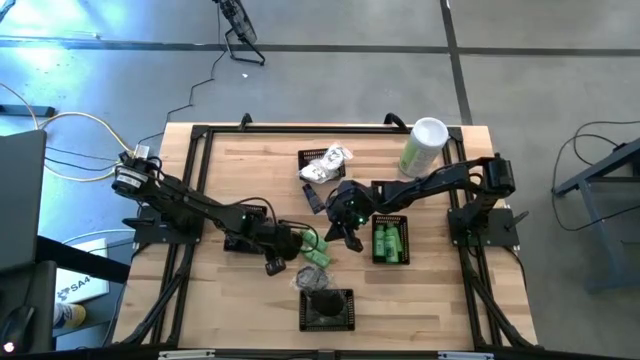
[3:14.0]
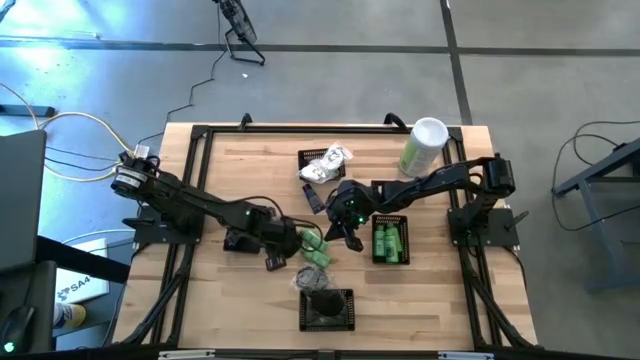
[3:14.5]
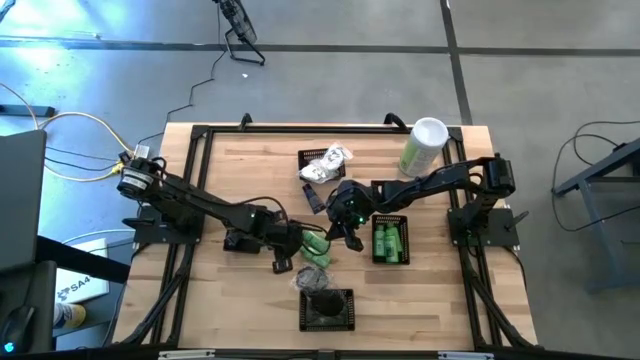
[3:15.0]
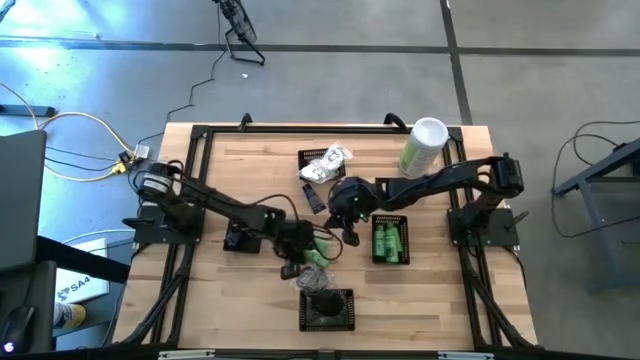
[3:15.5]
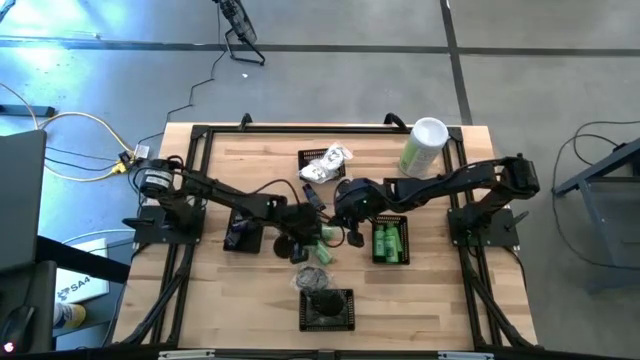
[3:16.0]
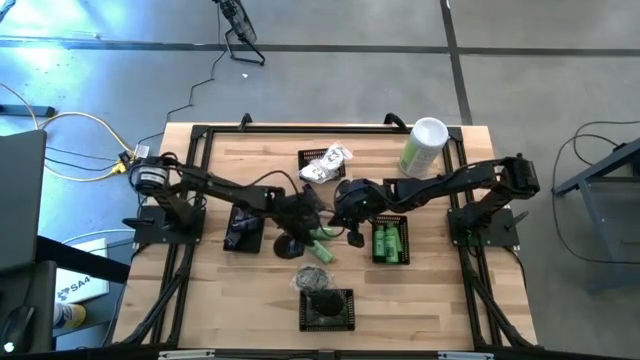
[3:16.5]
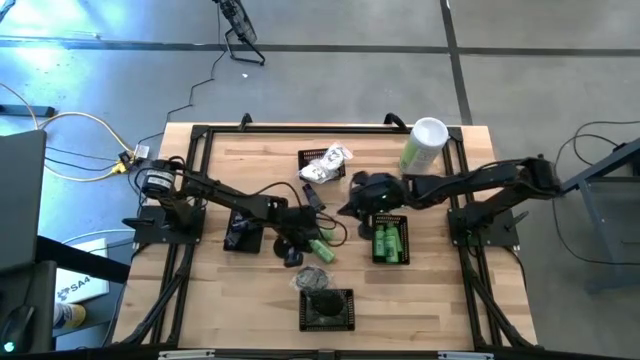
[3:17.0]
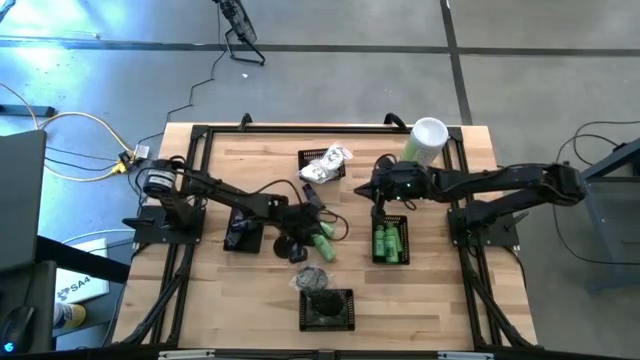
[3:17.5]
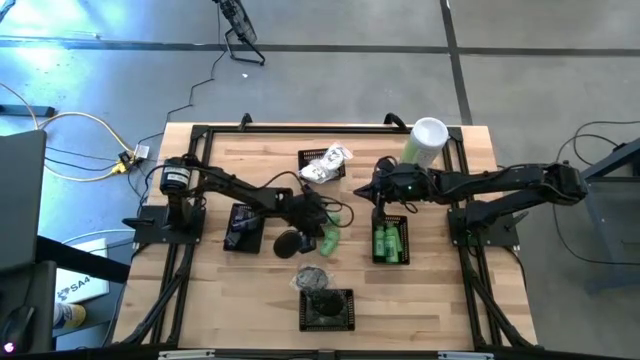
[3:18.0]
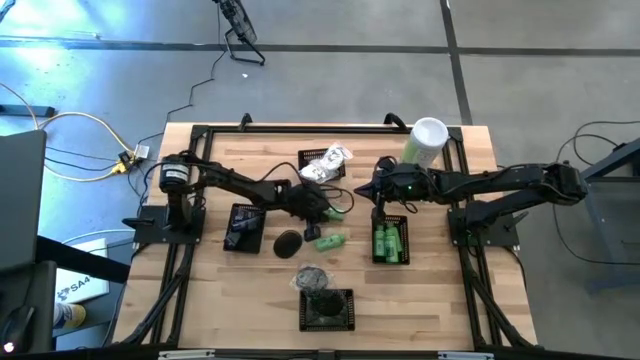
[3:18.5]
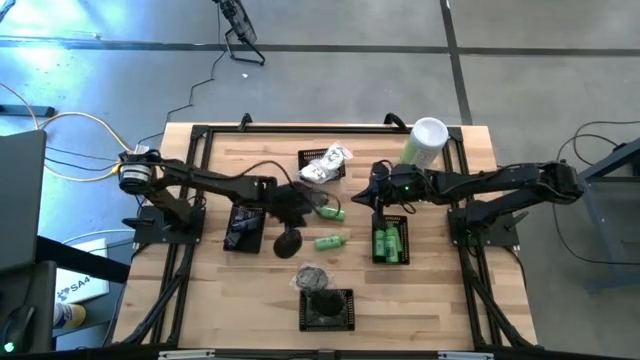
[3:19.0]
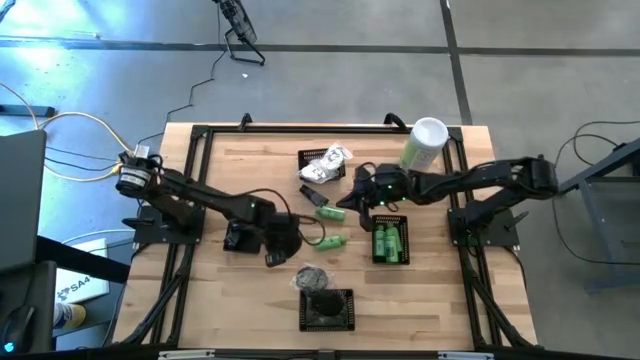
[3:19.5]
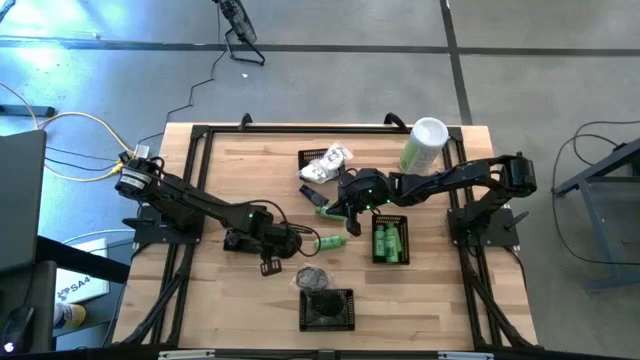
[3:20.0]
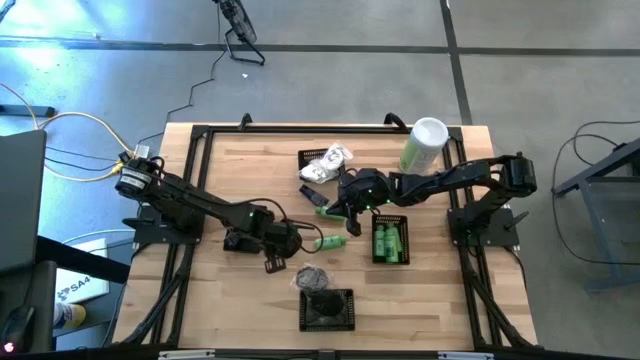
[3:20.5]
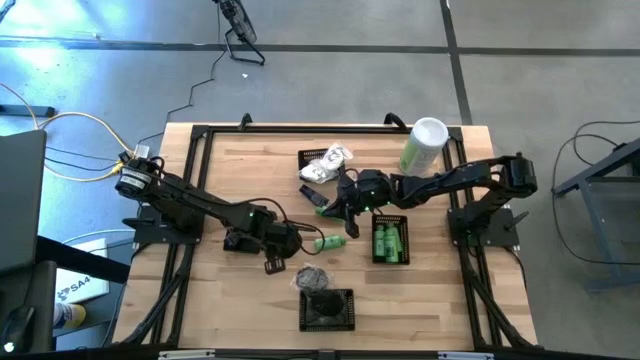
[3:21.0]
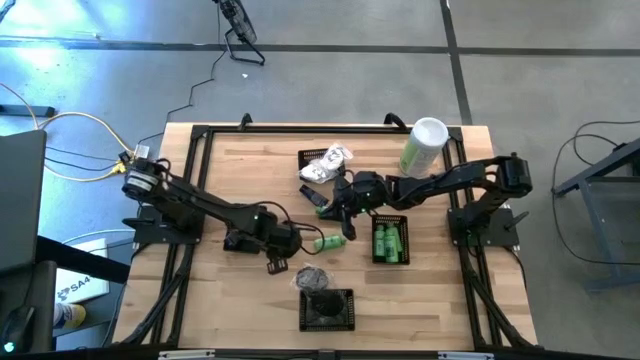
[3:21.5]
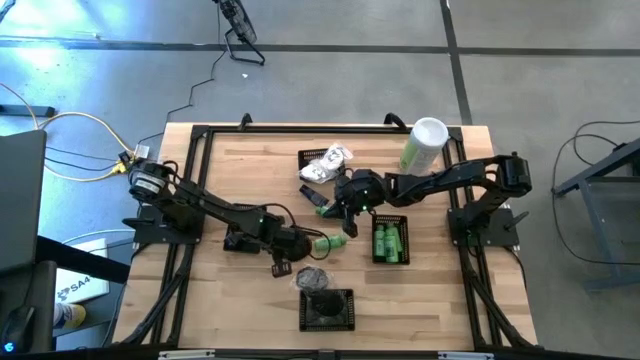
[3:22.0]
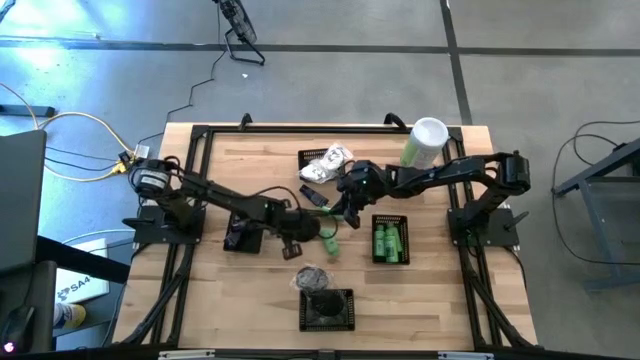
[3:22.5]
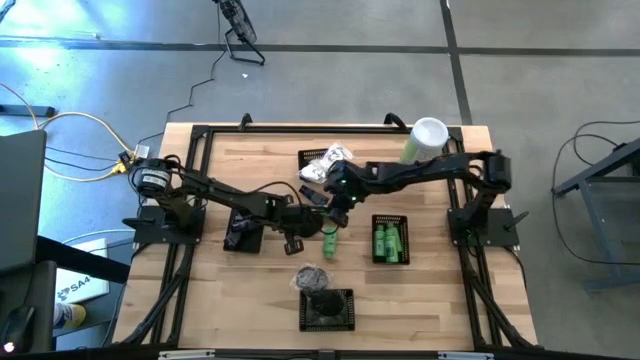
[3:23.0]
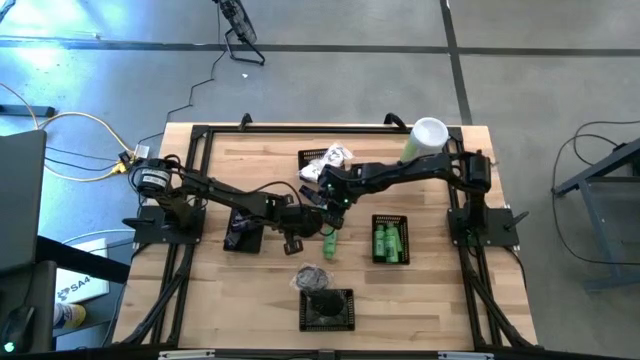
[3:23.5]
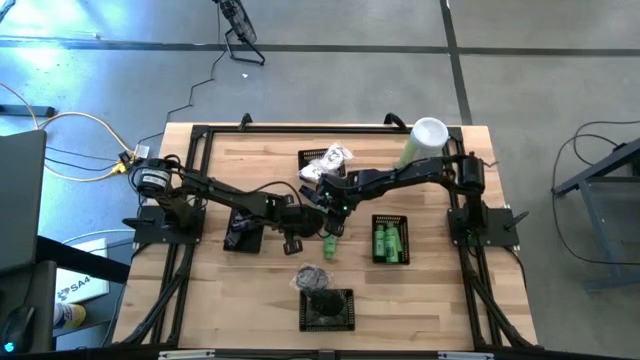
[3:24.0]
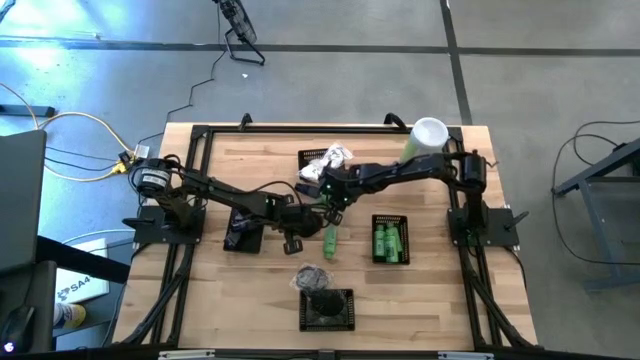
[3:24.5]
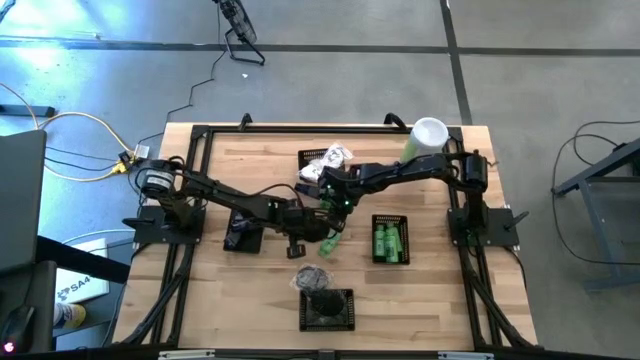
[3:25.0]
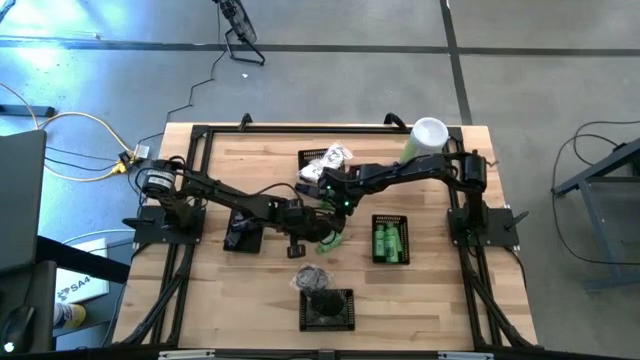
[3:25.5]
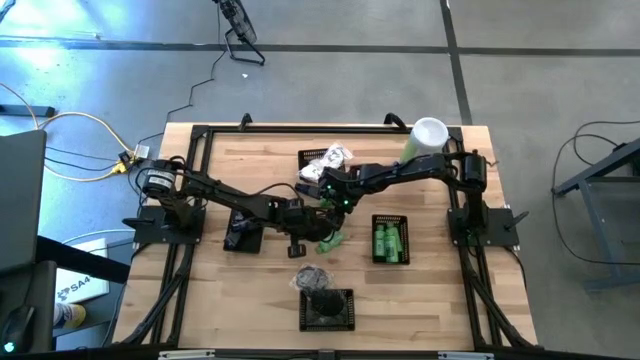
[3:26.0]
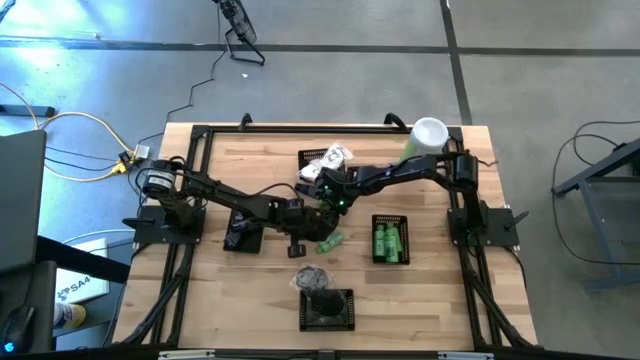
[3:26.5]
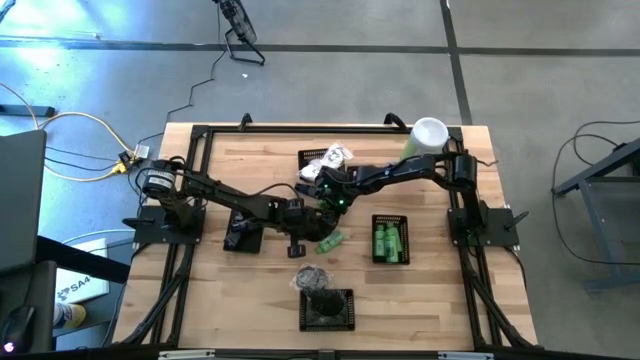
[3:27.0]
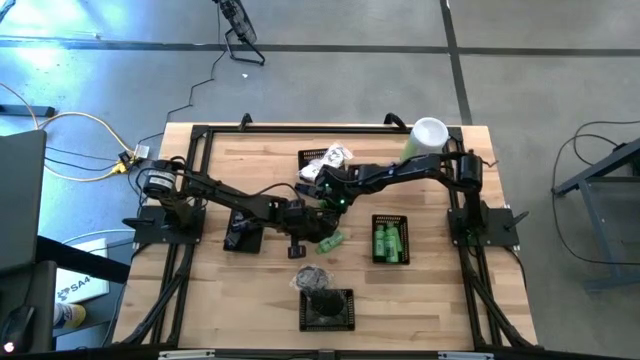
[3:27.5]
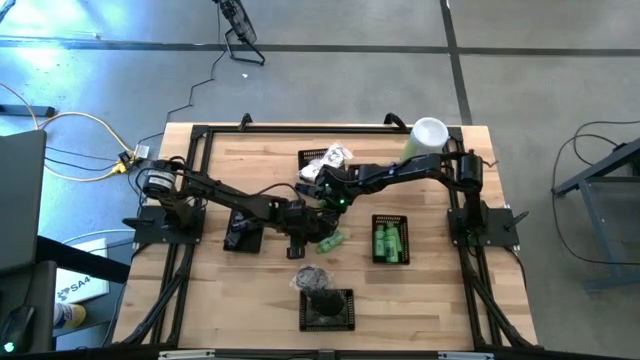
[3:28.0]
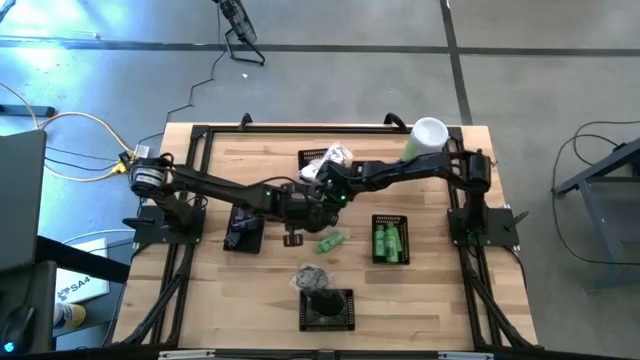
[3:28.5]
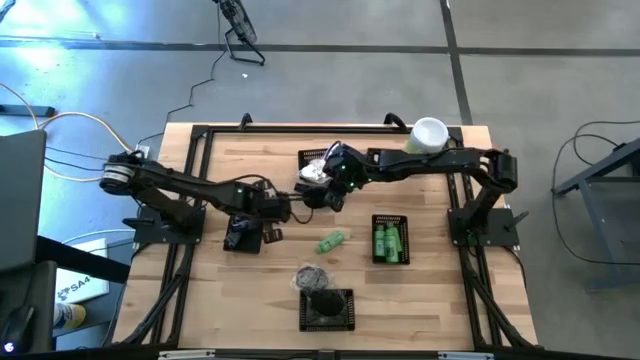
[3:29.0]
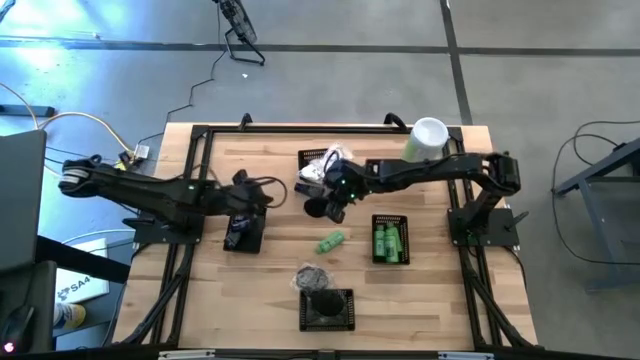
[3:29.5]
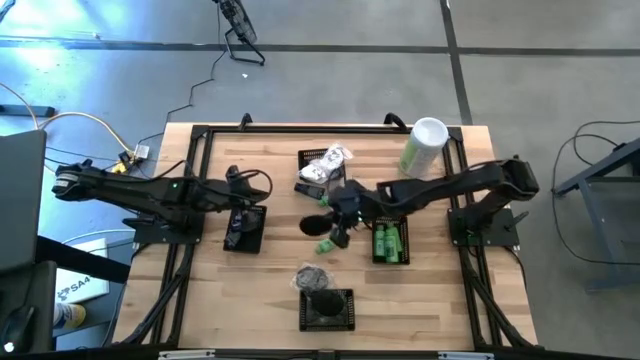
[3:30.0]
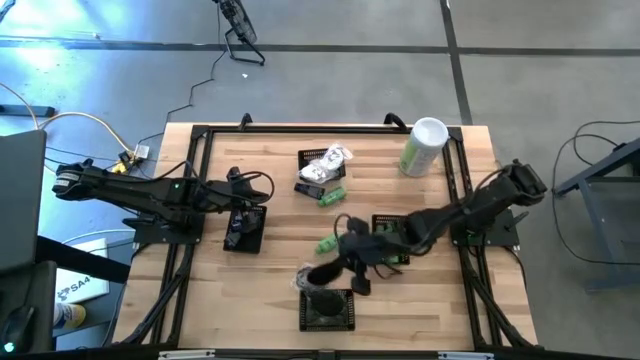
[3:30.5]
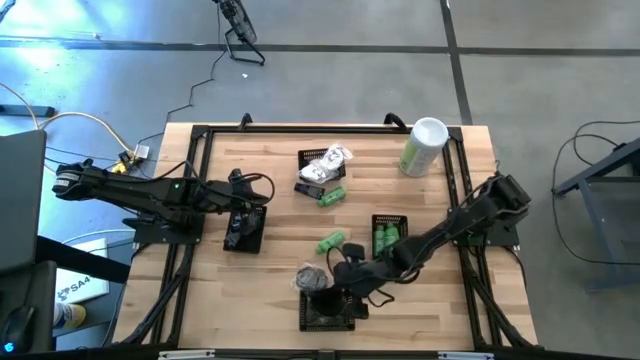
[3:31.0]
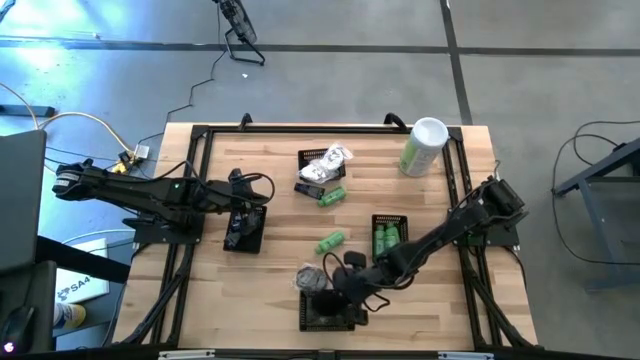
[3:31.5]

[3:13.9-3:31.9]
Task: Pick & Place Travel size toiletries
Put the left black brush into the bottom middle black bin
